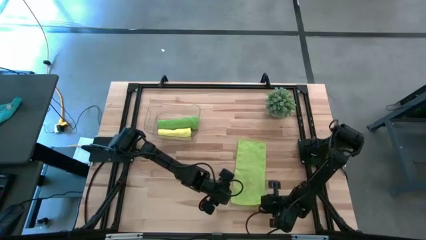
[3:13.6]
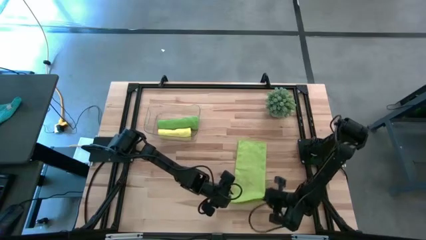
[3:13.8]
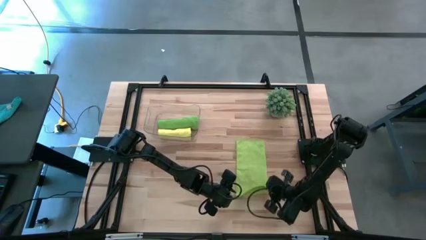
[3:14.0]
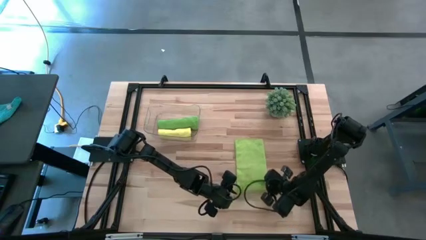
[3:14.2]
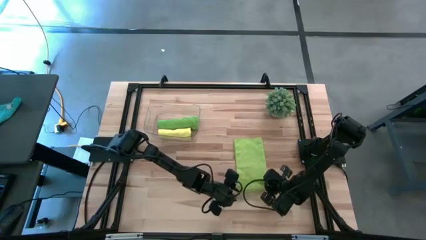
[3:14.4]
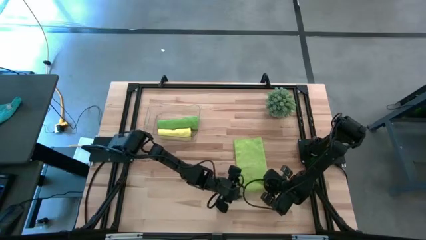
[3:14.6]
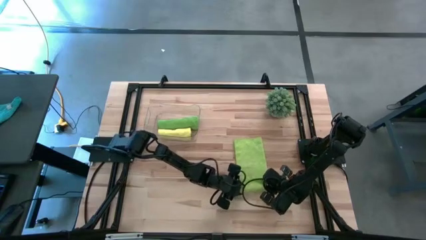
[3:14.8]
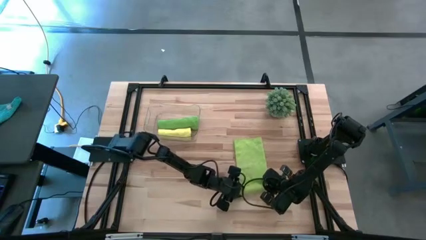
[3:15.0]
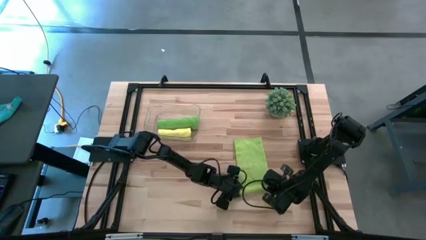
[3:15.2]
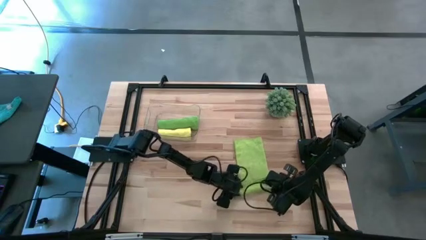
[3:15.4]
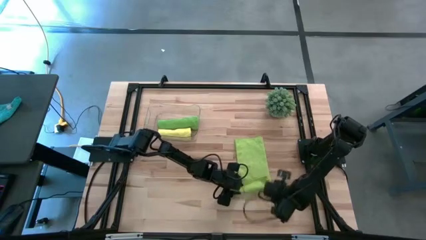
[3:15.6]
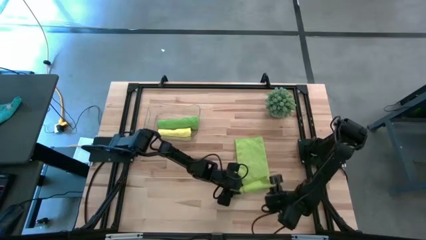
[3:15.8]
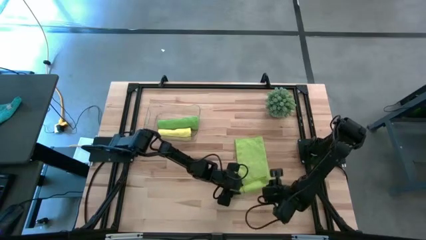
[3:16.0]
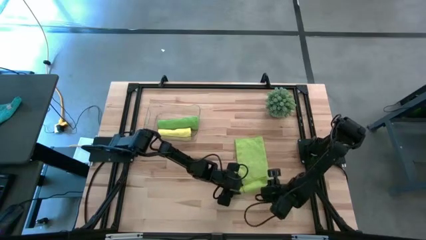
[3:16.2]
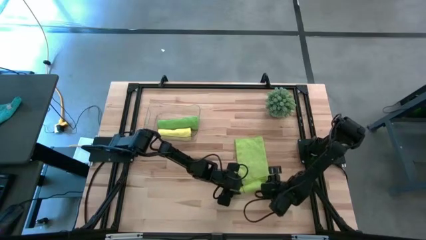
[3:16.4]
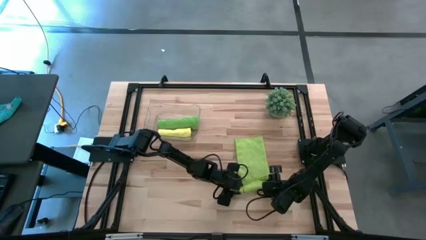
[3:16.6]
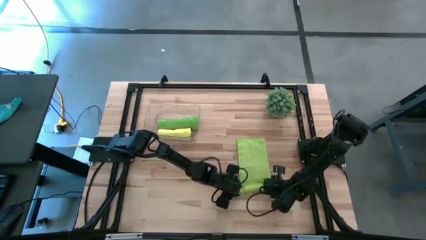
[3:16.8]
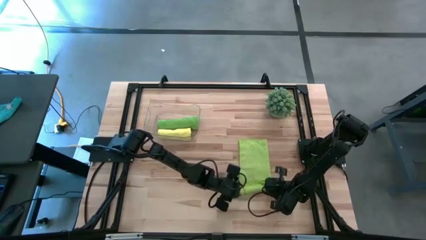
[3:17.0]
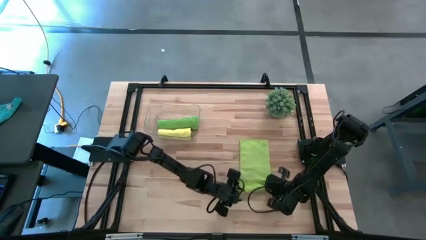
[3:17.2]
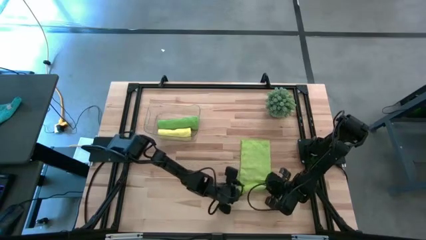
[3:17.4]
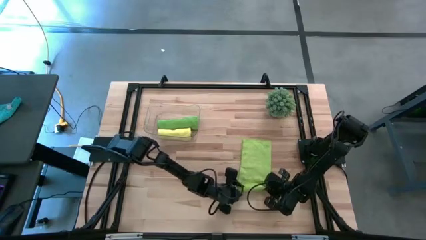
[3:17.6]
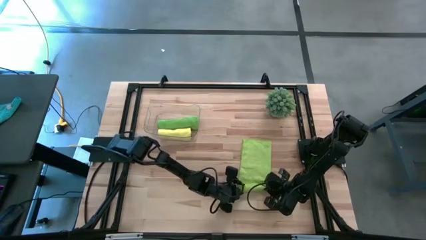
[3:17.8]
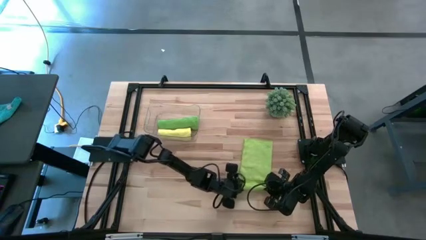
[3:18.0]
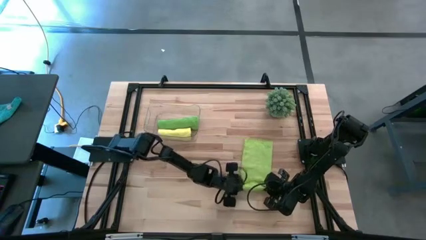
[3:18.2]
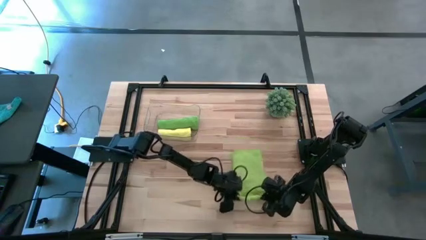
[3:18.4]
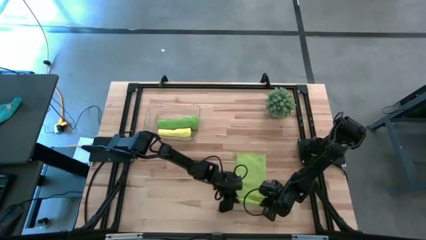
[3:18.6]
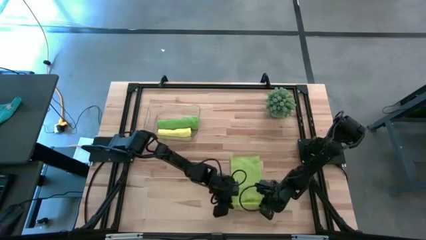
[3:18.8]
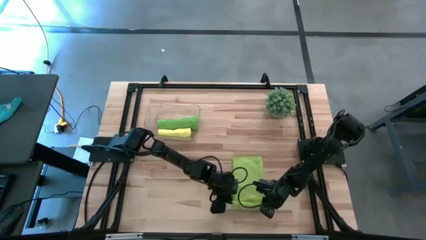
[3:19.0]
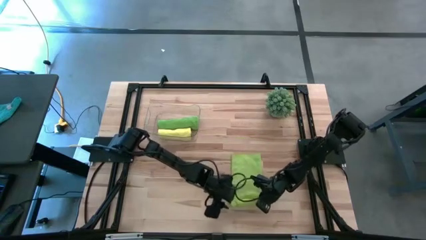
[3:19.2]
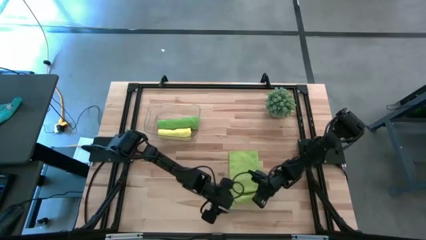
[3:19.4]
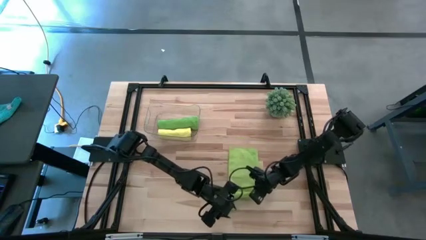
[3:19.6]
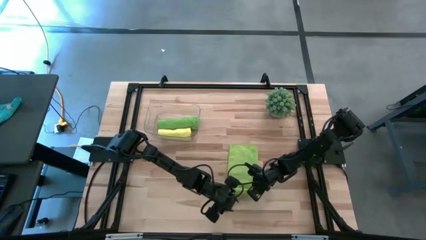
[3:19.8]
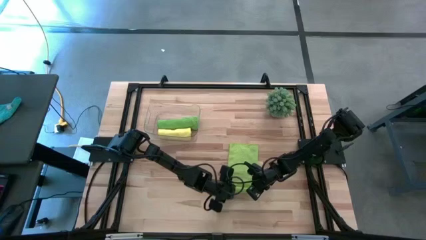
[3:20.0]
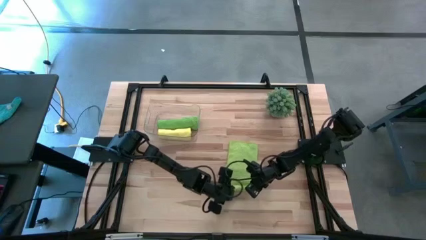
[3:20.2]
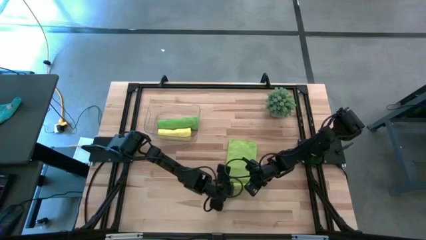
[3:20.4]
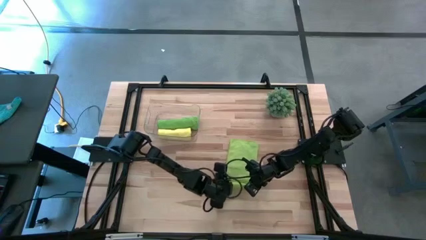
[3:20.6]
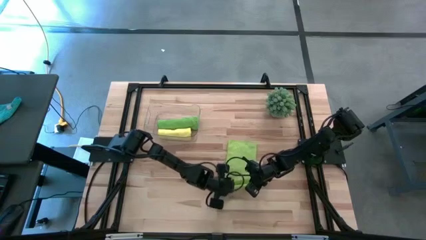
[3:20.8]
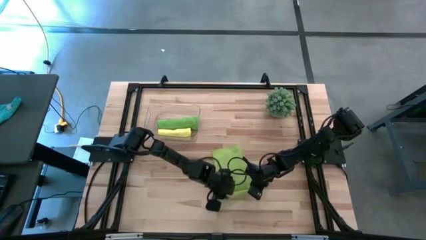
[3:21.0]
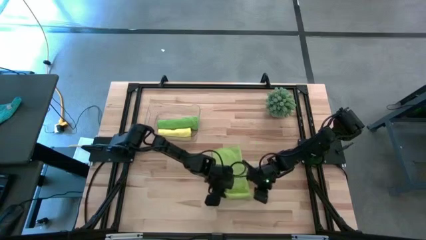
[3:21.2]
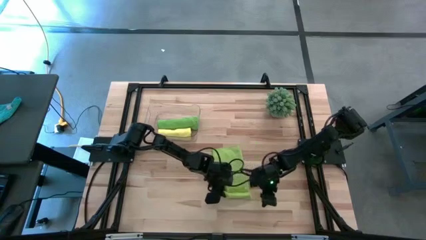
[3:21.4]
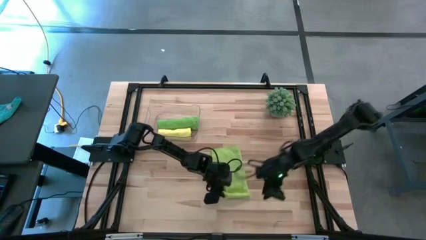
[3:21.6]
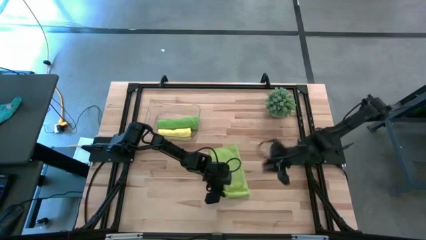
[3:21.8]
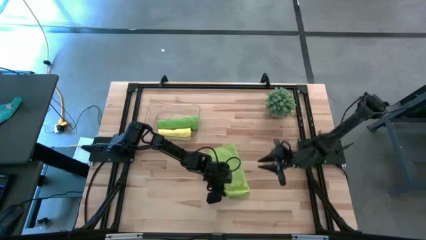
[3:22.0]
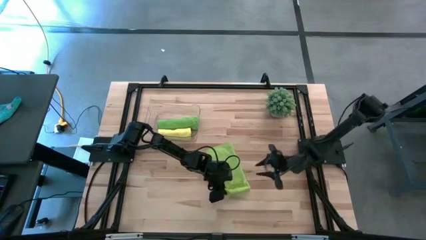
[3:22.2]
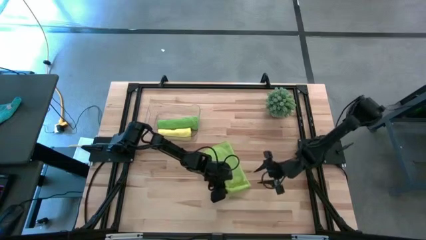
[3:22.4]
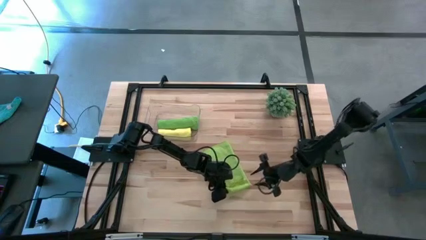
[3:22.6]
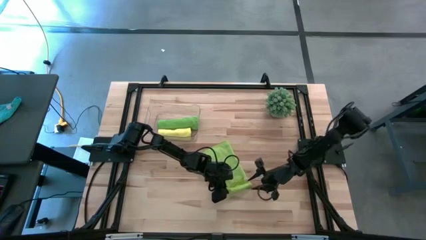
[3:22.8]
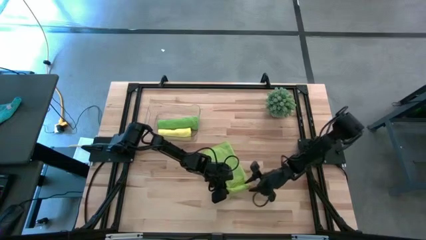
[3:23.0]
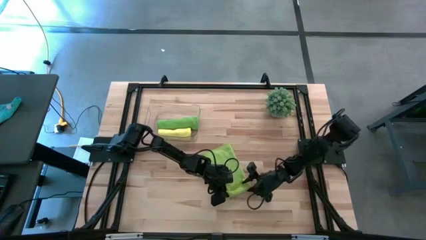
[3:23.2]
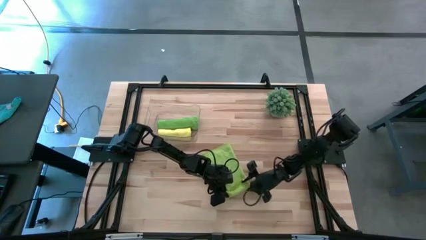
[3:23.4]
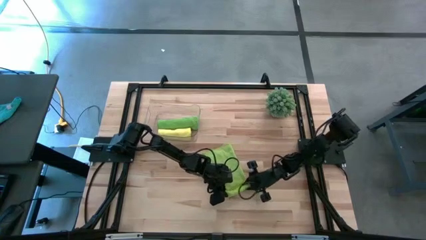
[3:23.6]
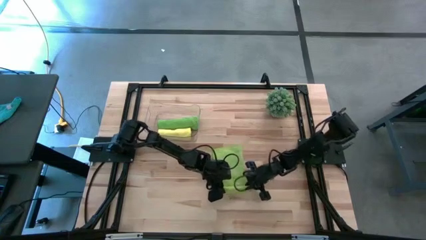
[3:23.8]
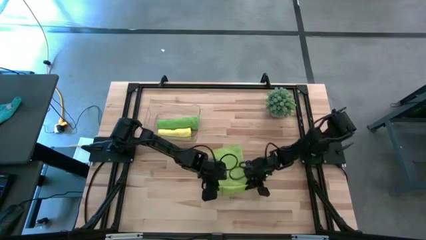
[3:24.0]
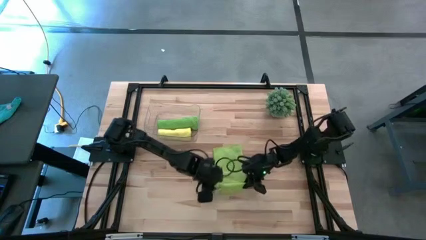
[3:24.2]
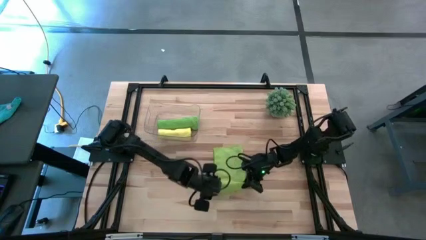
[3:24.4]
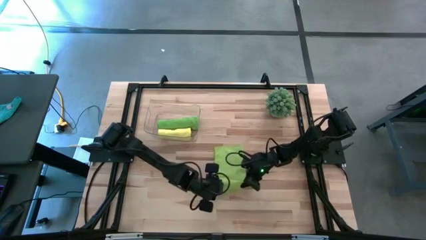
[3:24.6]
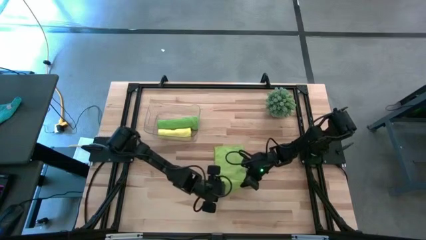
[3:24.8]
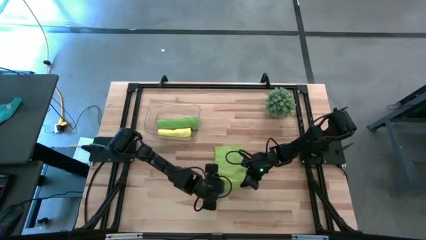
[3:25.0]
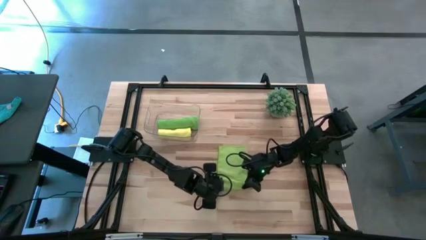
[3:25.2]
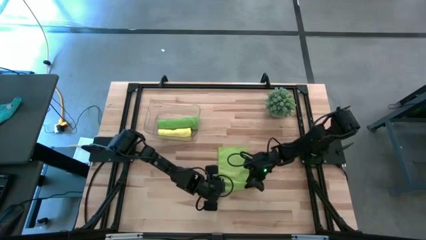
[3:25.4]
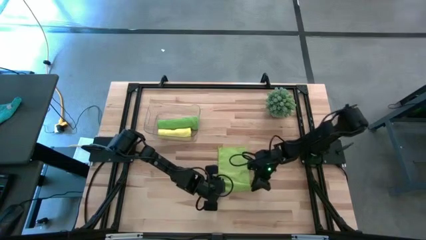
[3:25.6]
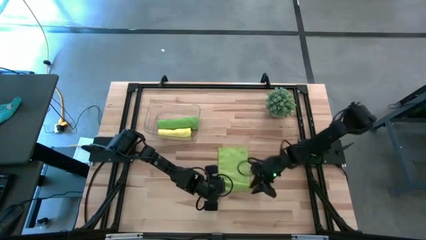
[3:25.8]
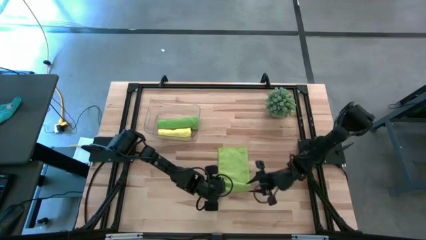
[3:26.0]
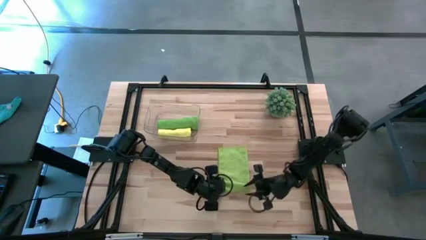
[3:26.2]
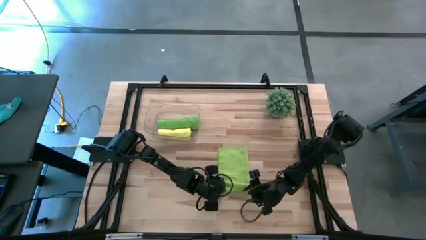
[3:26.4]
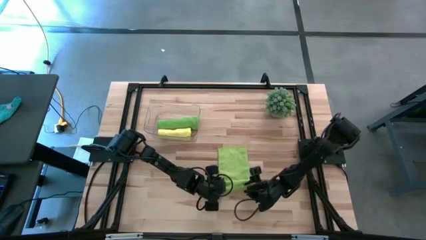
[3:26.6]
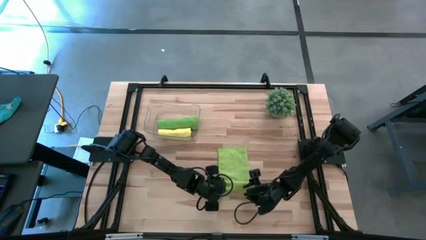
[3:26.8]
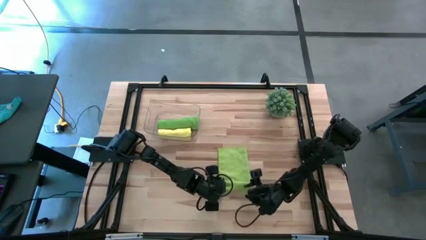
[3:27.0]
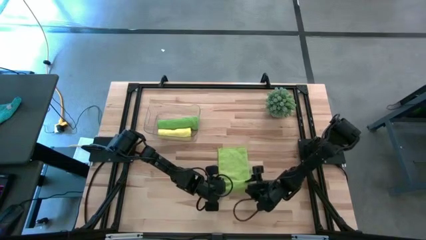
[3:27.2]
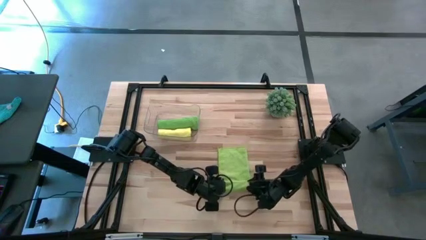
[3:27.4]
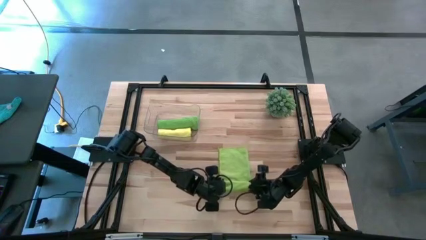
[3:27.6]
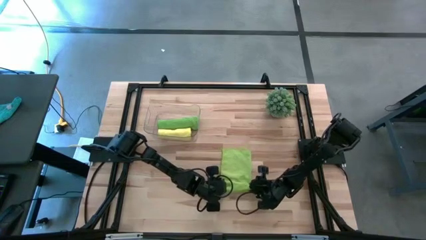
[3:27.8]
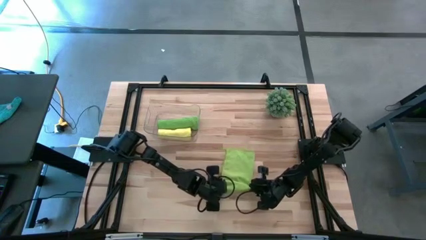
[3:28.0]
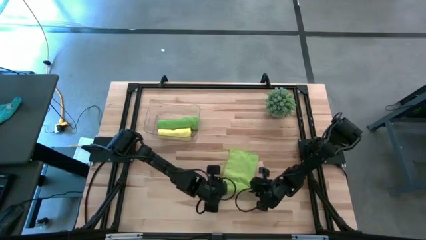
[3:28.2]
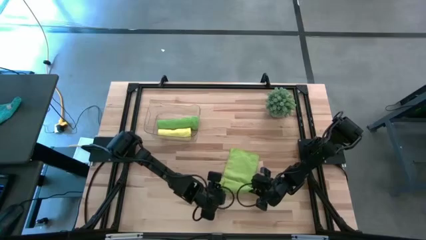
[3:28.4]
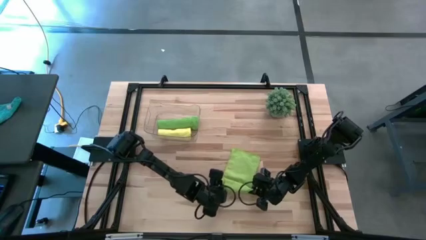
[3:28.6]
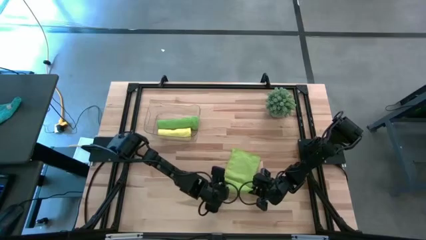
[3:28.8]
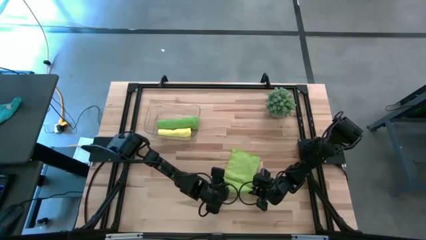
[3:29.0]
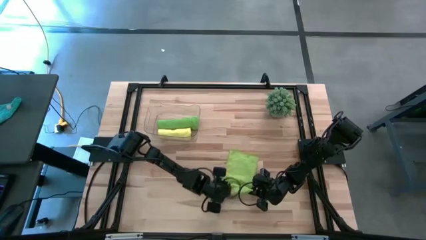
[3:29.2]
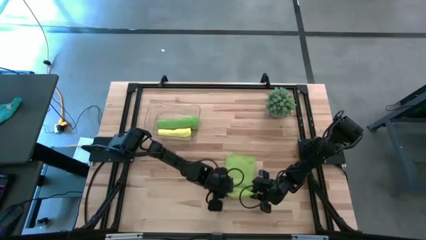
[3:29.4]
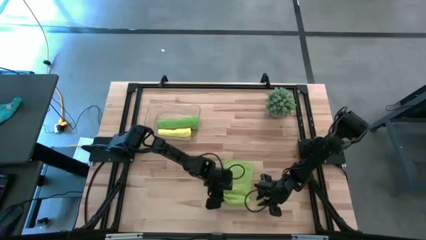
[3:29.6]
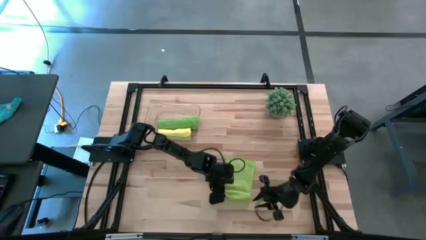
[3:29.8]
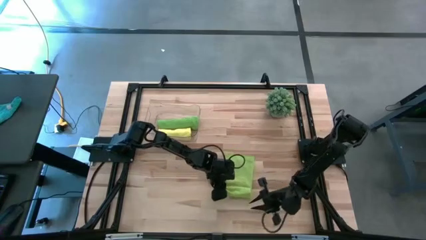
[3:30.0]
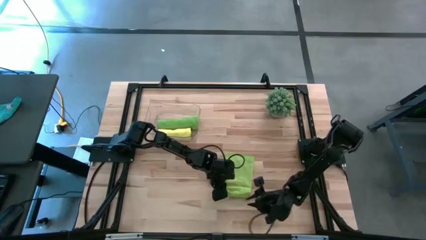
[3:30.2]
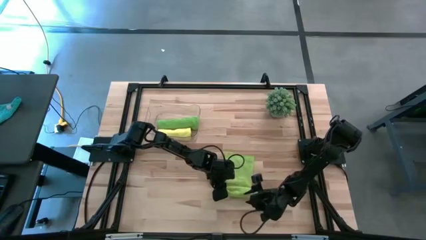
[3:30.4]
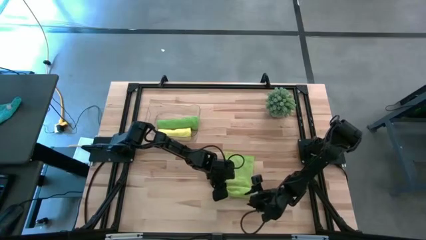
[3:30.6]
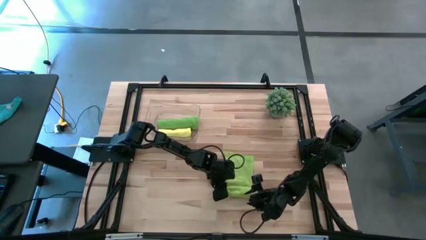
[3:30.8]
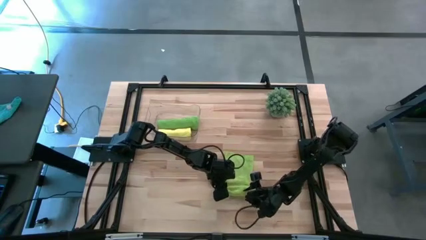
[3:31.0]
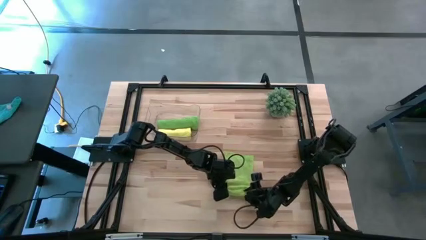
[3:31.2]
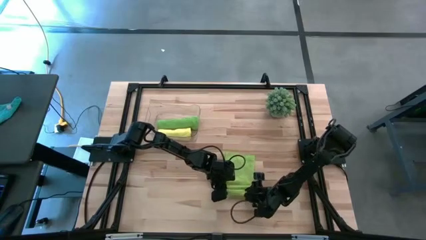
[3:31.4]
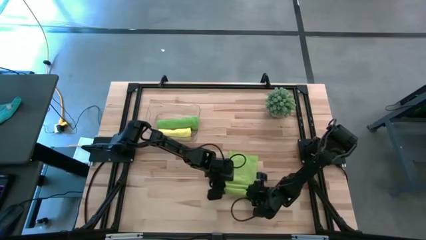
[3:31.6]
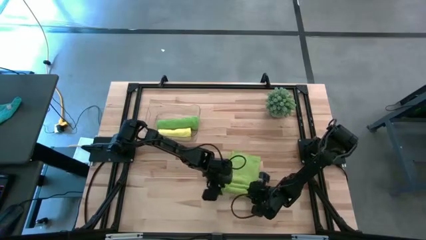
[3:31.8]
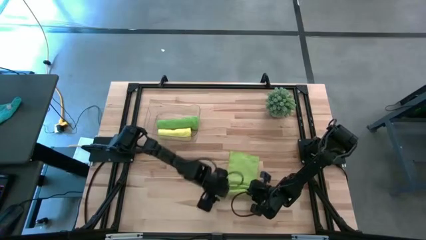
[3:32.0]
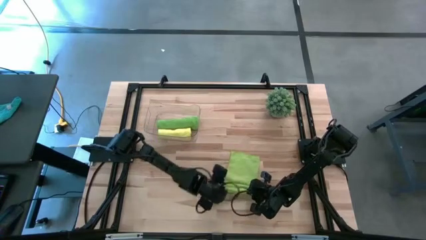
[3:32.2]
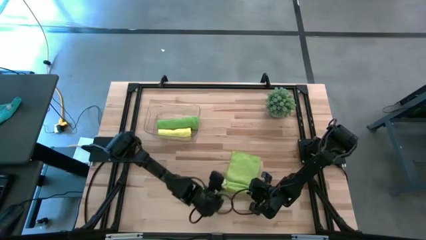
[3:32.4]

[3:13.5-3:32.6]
Task: Roll microfiber towels into tight, uniform cylinder then place into a basket
Roll the green towel
